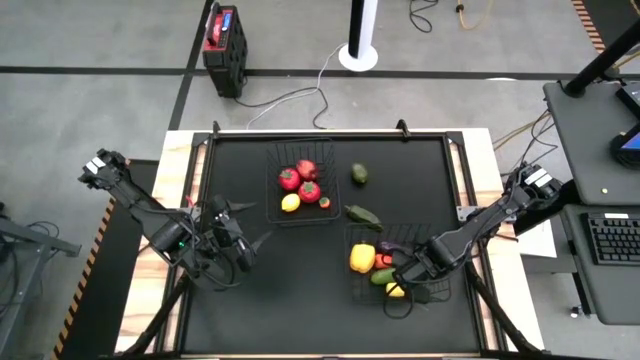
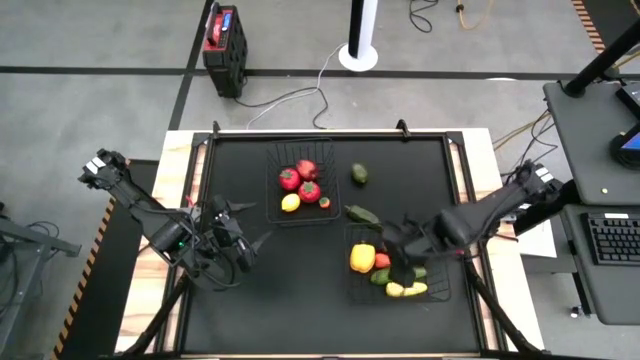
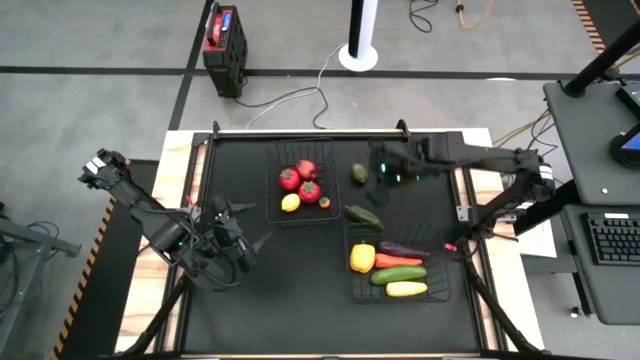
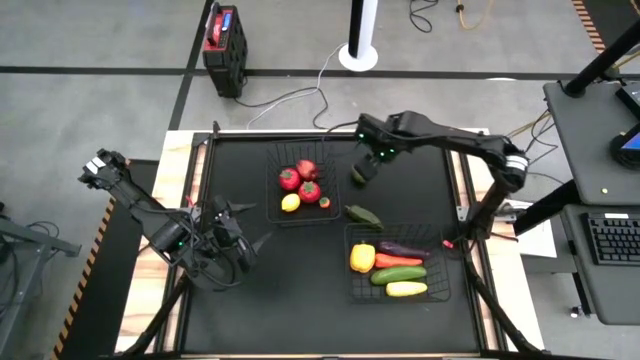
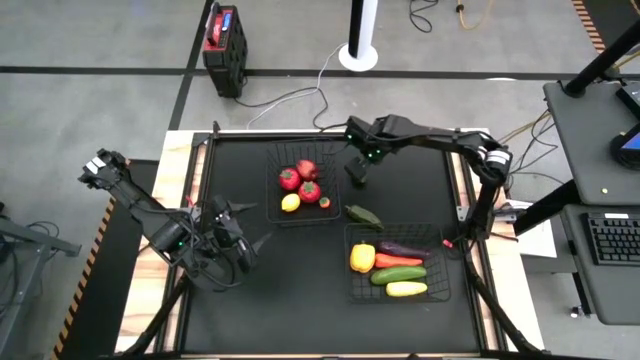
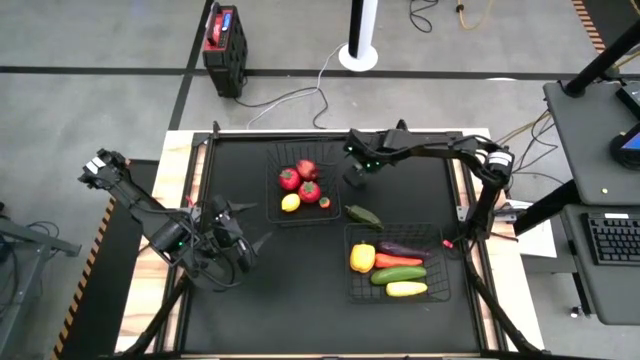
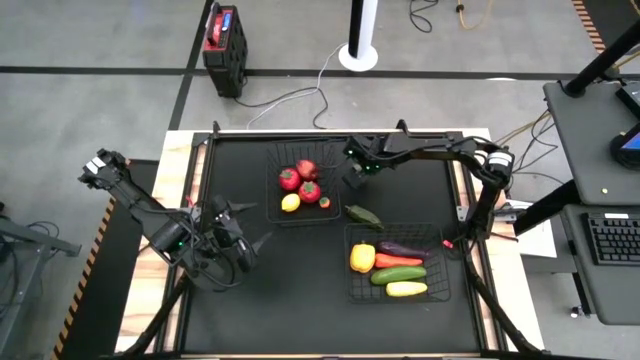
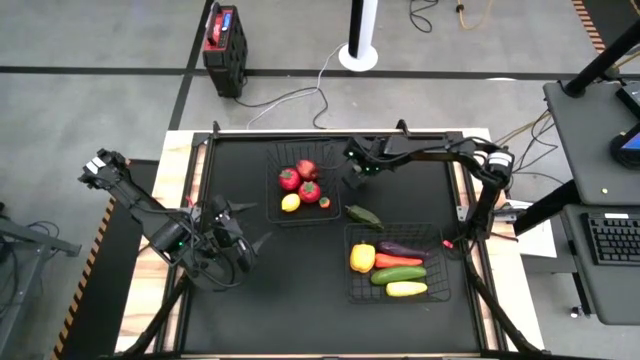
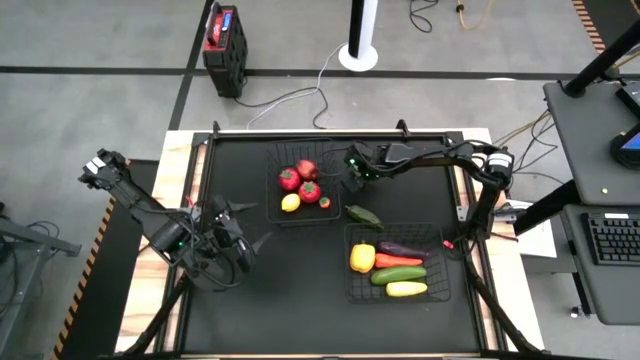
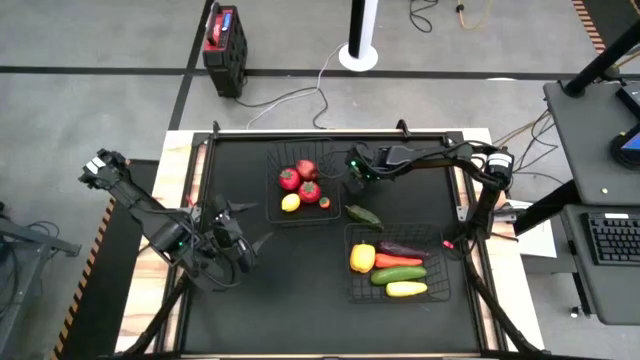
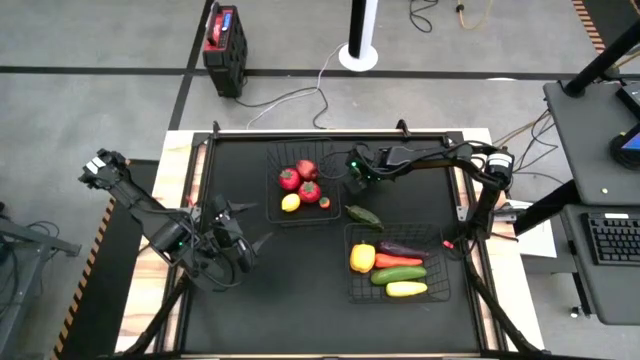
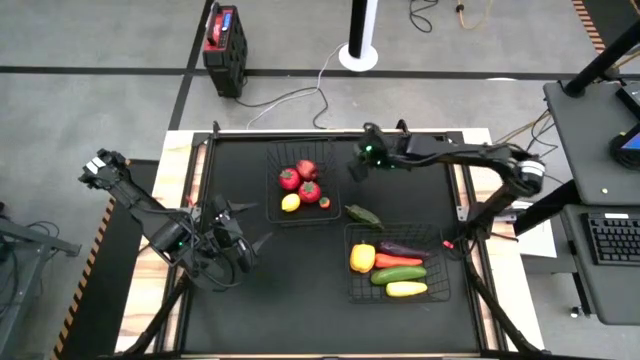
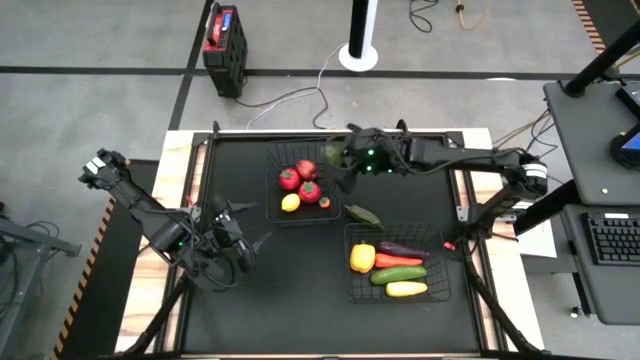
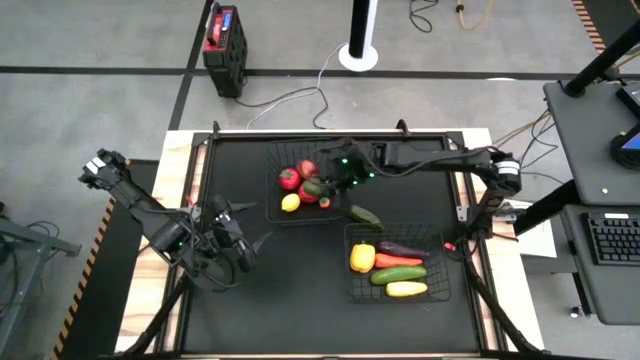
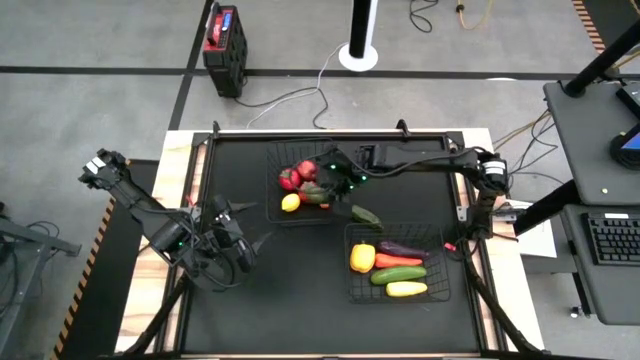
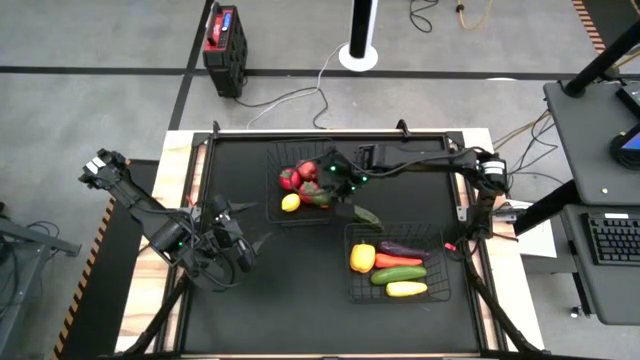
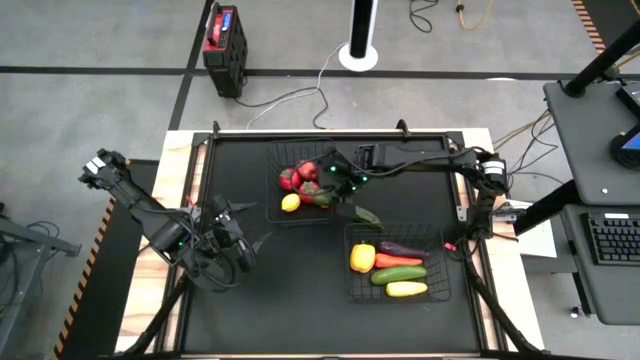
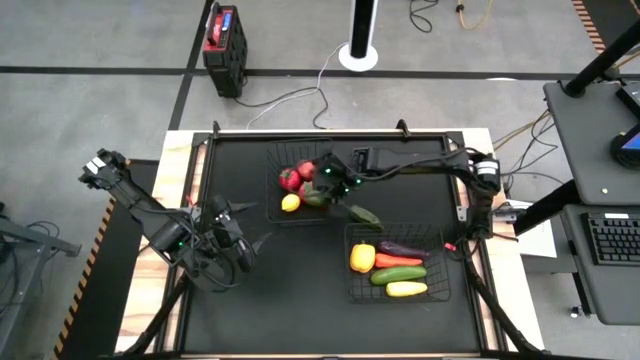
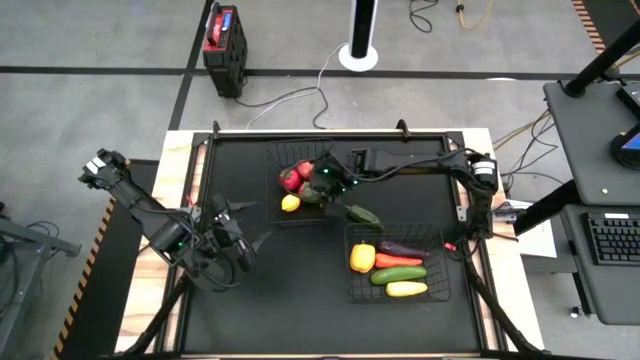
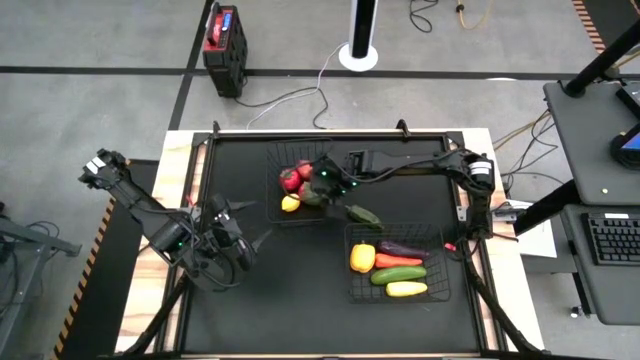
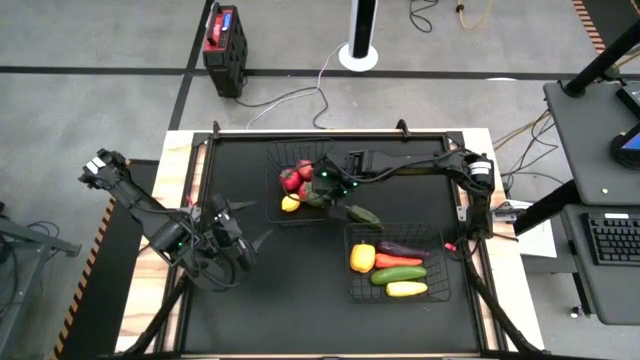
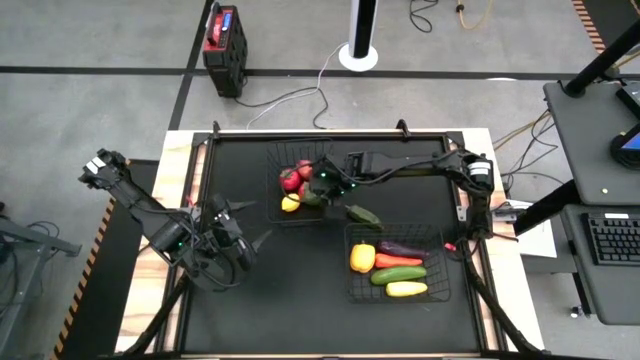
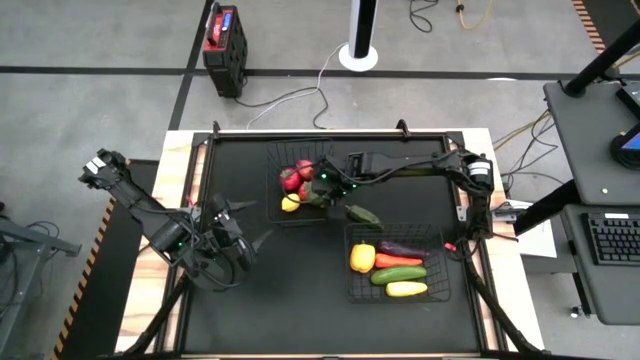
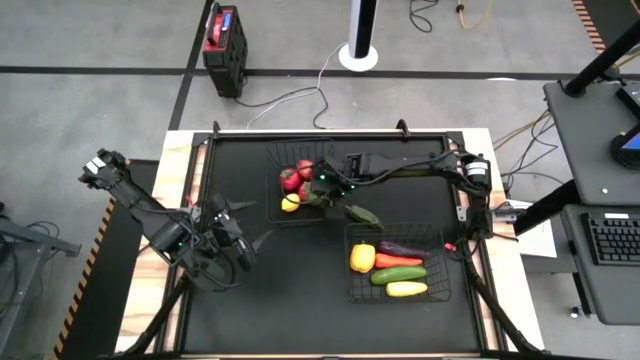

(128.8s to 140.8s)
Task: Sort produce into baskets
Put the green lime into the top black wire basket

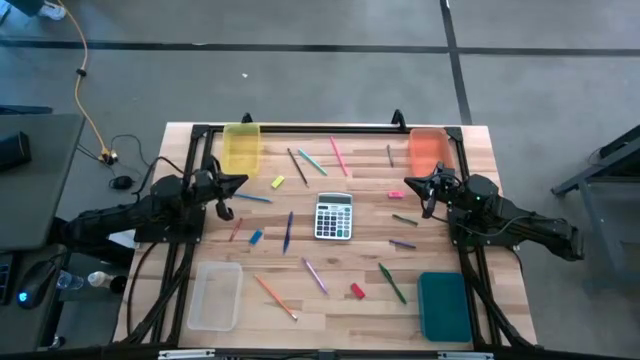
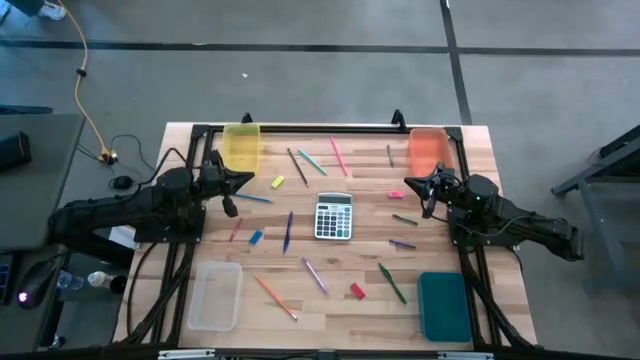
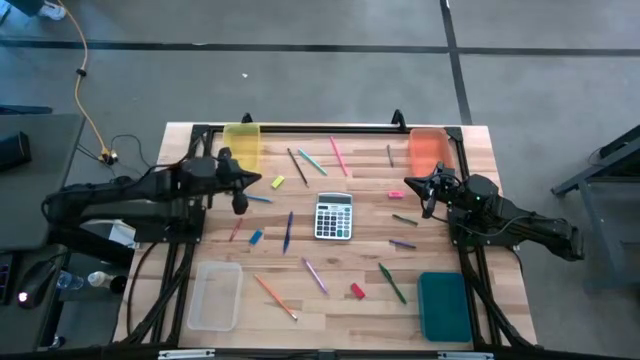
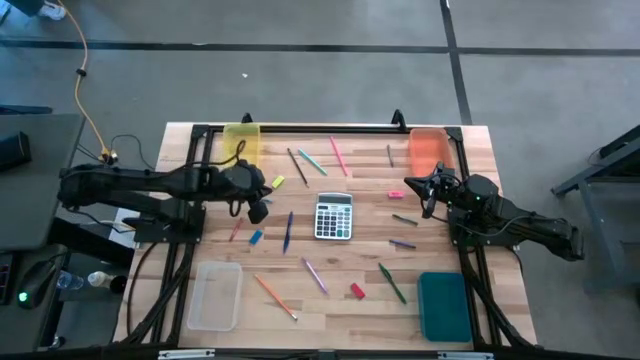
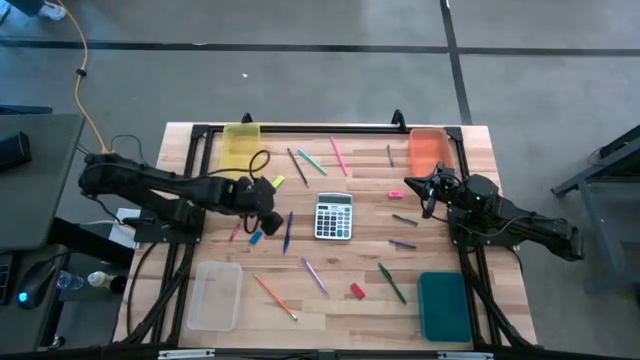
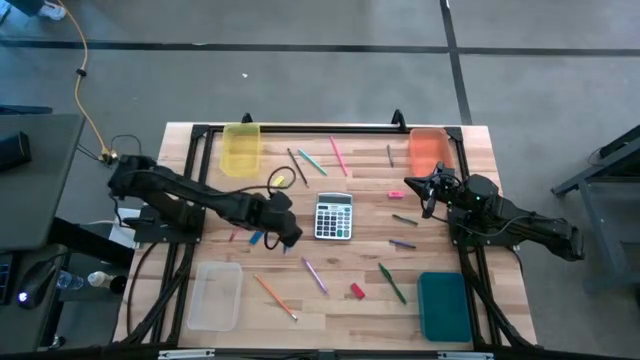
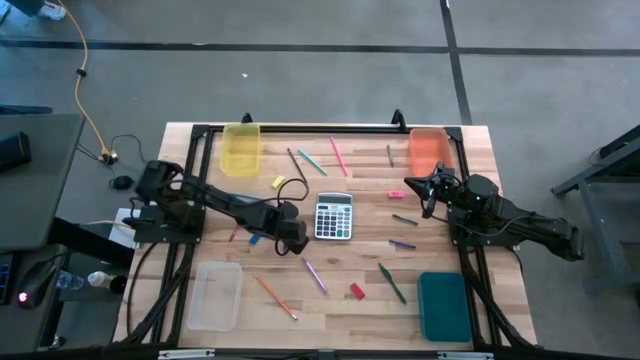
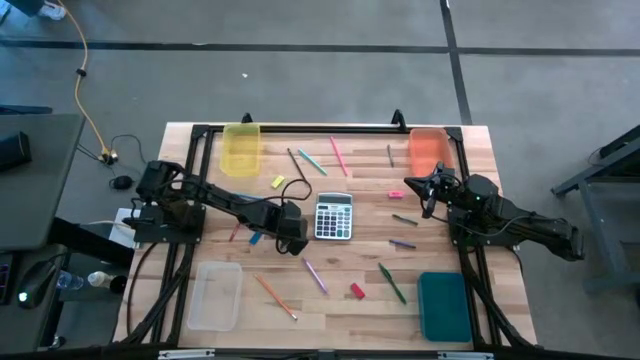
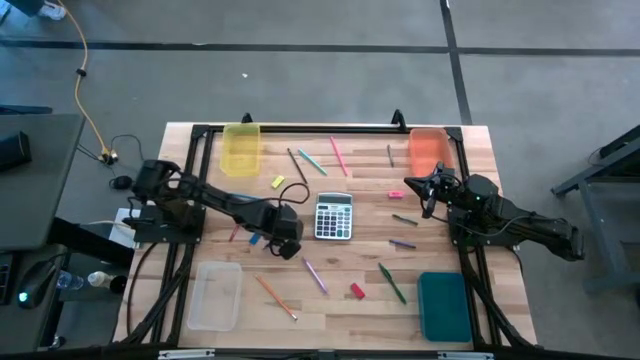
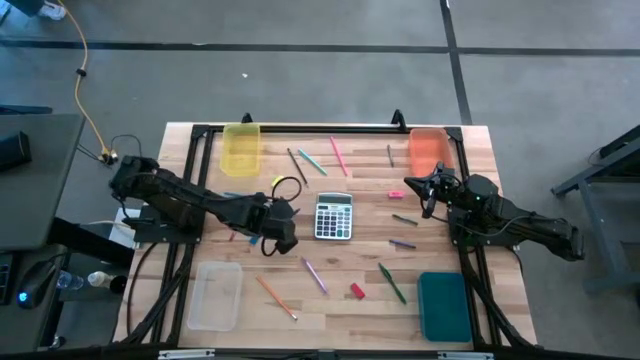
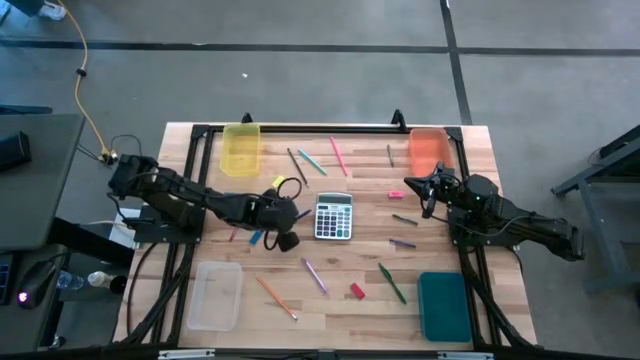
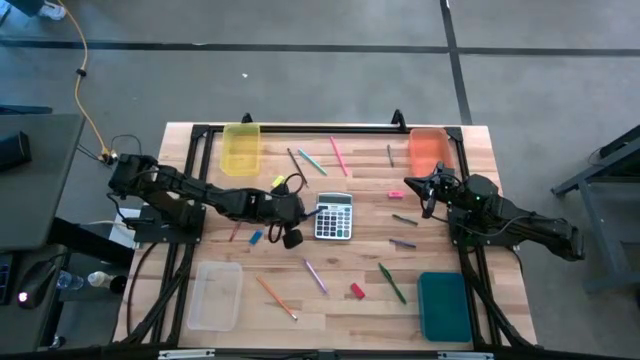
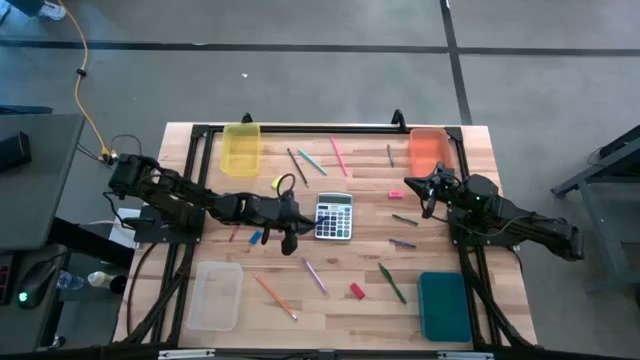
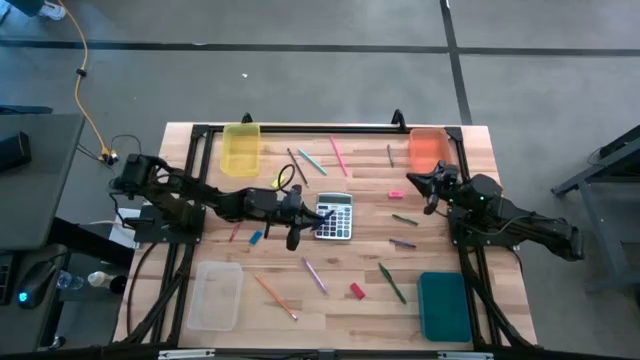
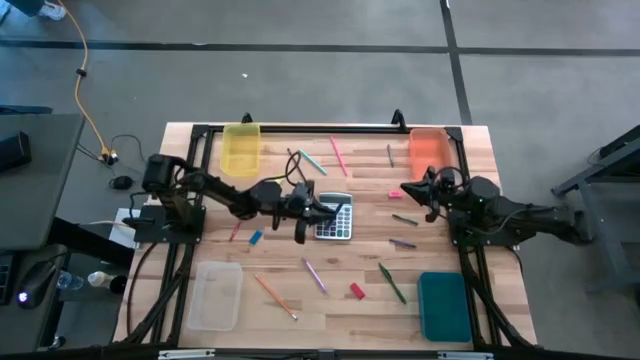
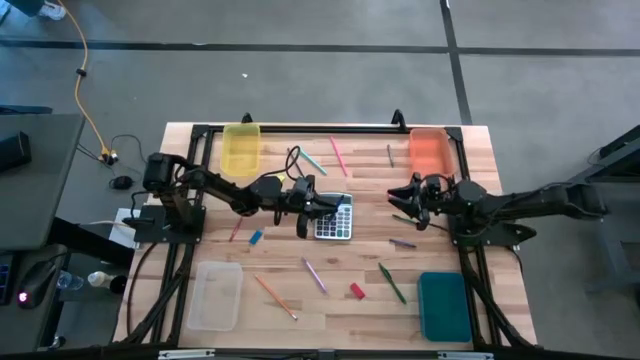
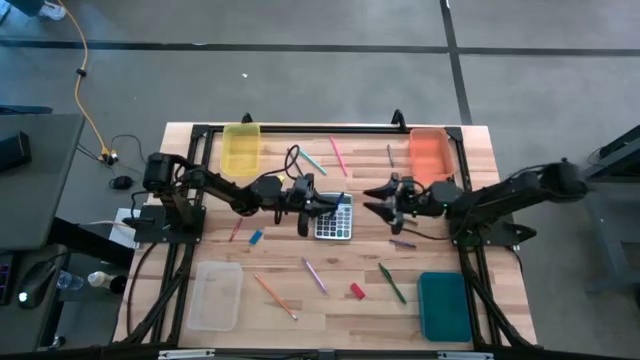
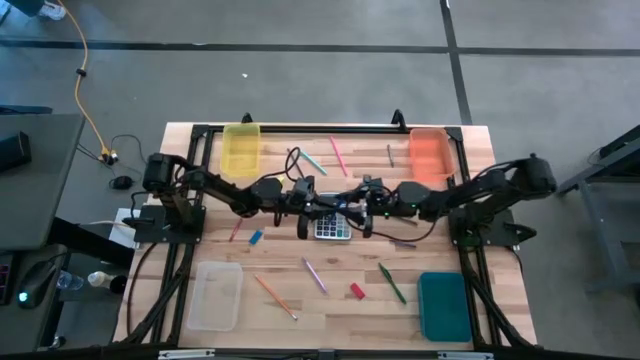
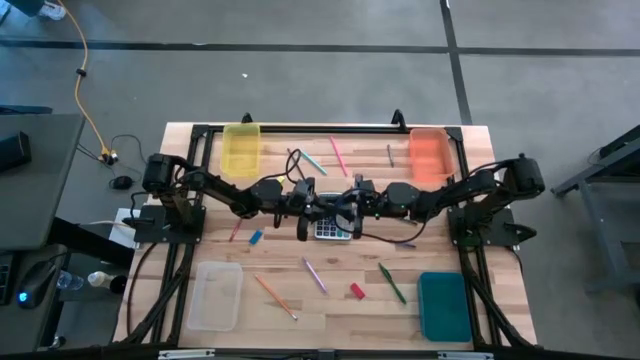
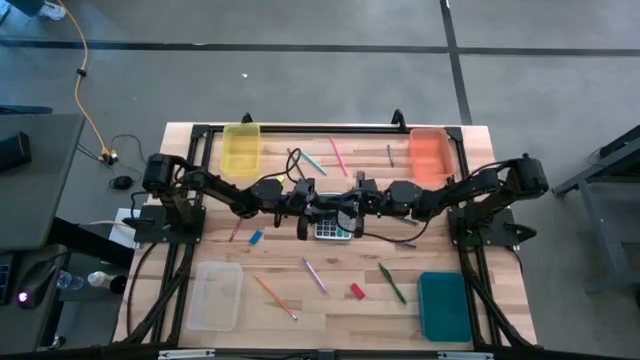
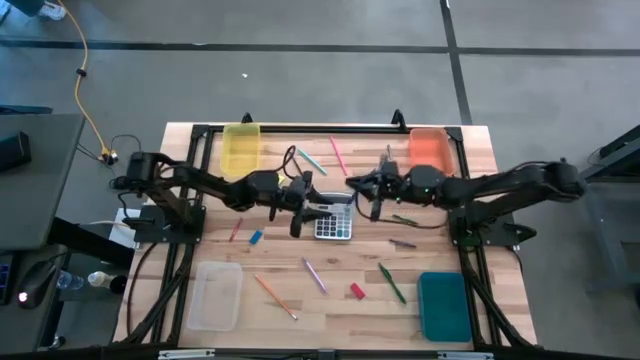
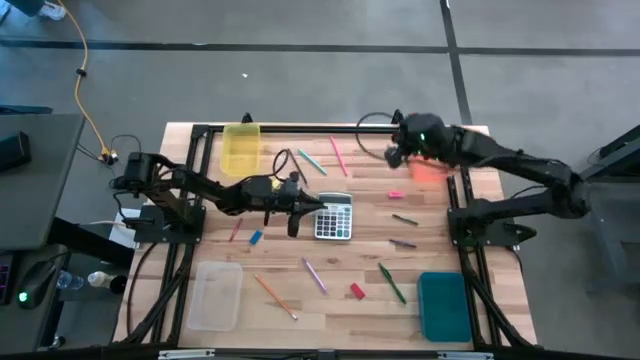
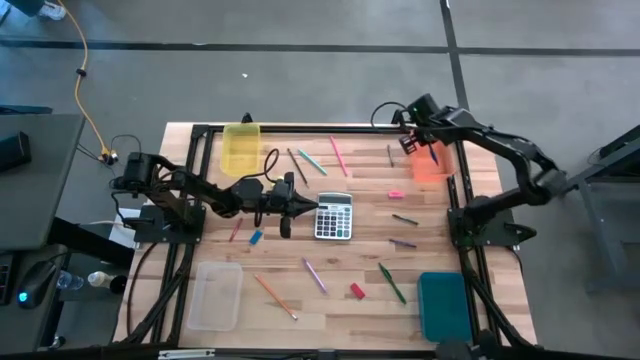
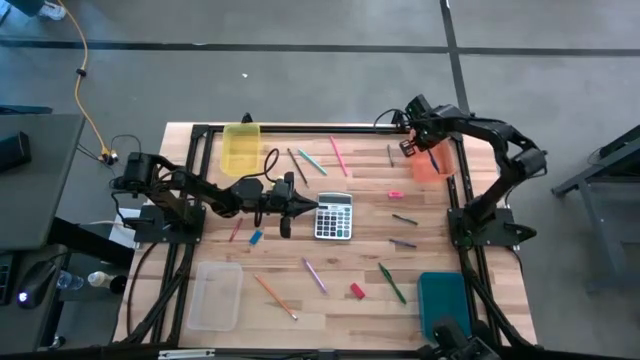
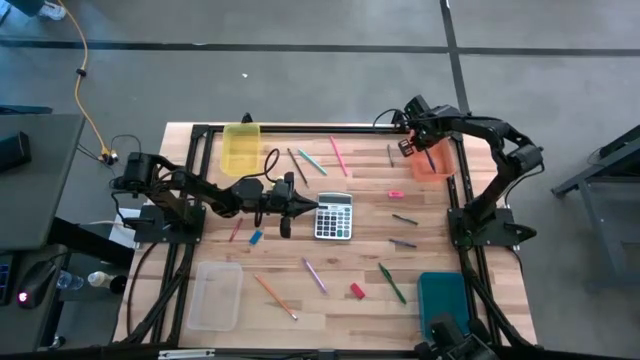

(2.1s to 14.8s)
Task: Sort crayons/erasers/pens/pencils in bins
Put the blue pen into the orange bin
